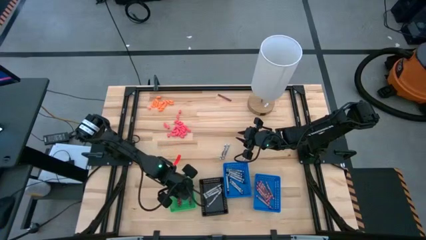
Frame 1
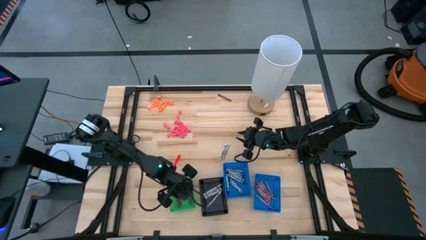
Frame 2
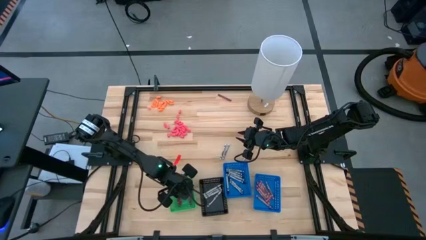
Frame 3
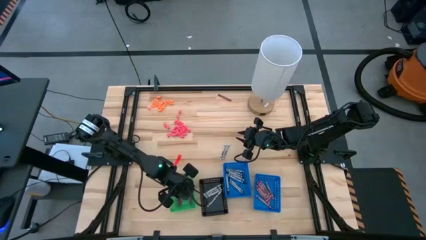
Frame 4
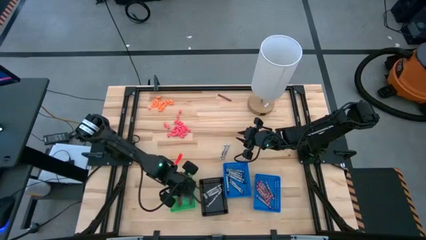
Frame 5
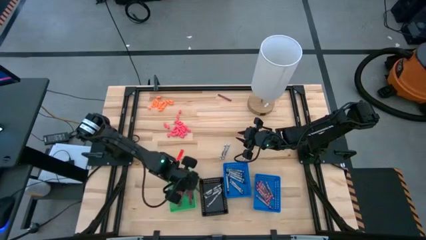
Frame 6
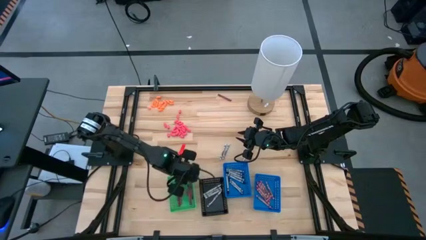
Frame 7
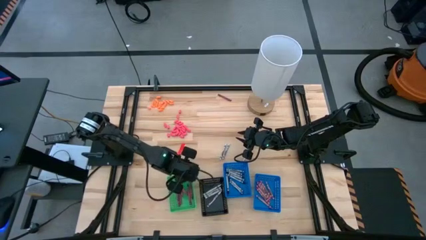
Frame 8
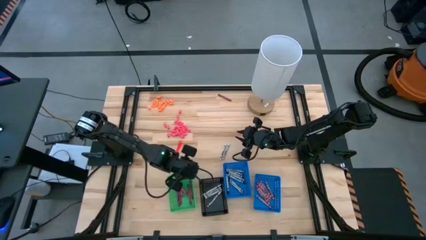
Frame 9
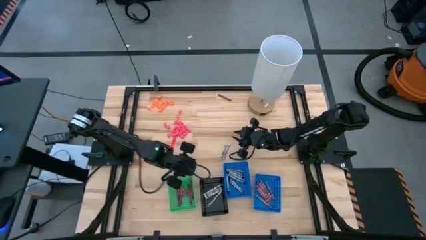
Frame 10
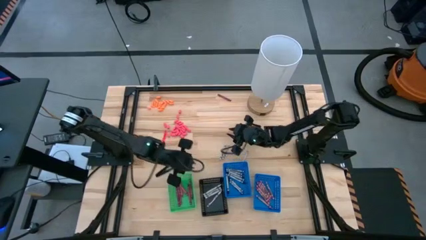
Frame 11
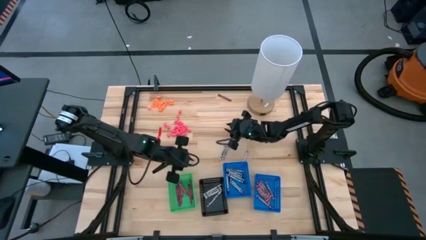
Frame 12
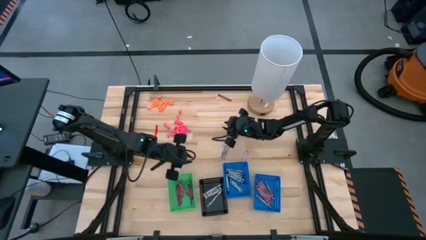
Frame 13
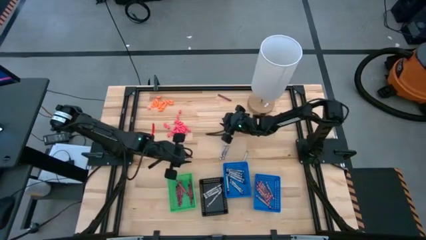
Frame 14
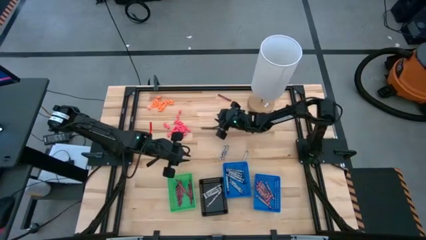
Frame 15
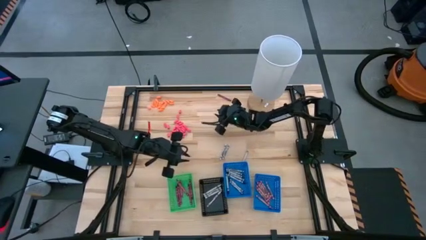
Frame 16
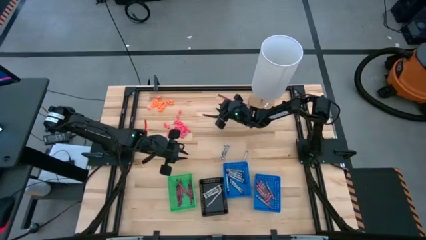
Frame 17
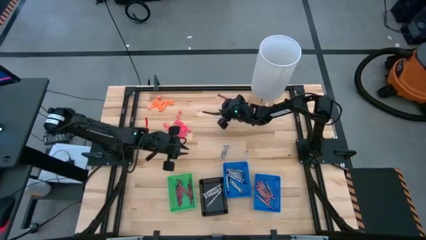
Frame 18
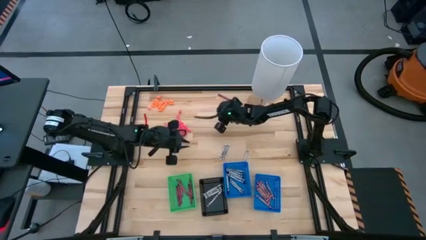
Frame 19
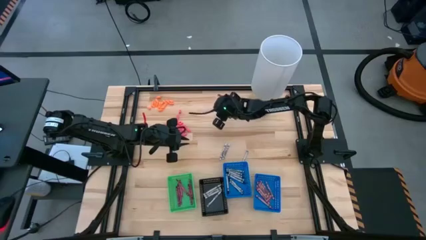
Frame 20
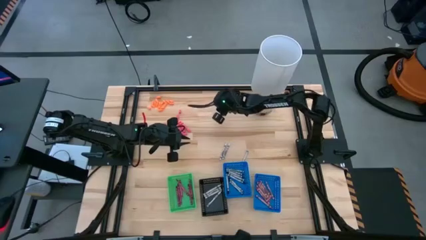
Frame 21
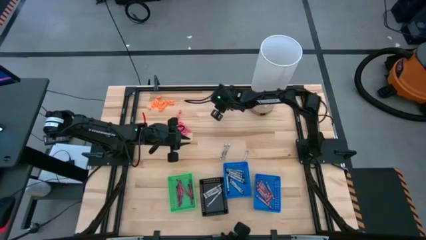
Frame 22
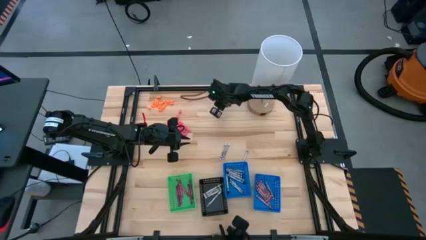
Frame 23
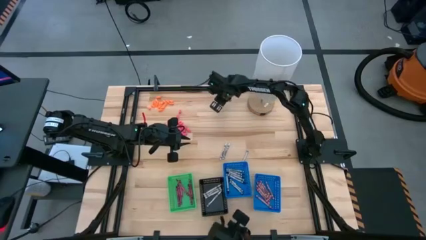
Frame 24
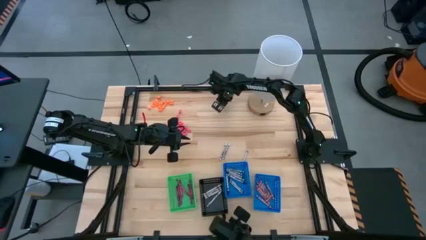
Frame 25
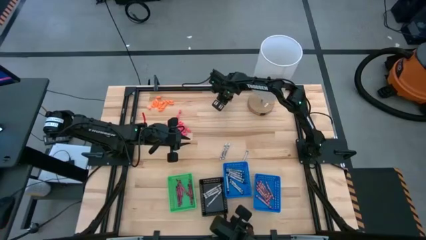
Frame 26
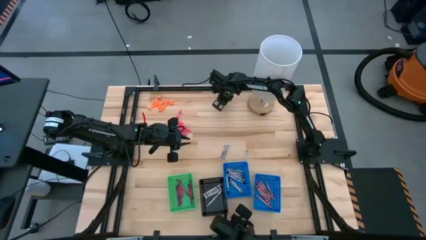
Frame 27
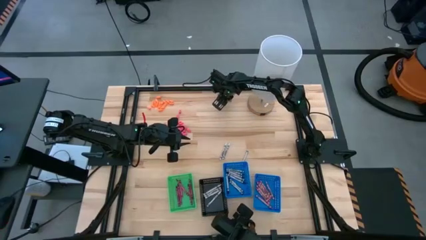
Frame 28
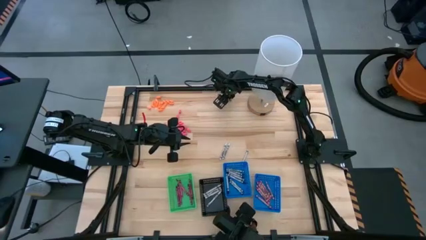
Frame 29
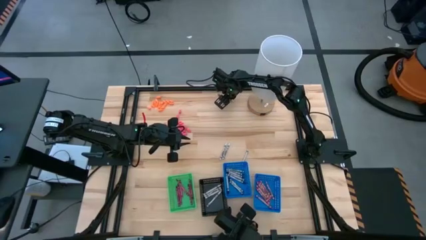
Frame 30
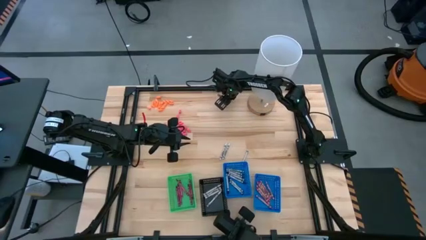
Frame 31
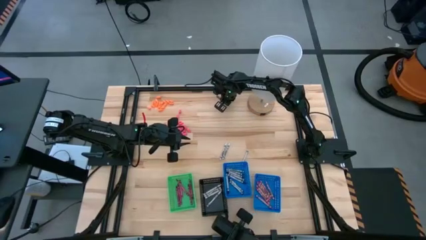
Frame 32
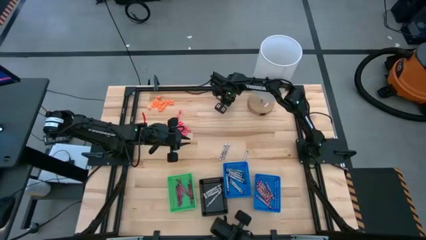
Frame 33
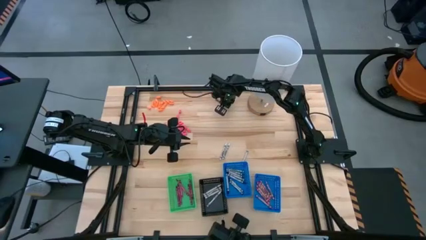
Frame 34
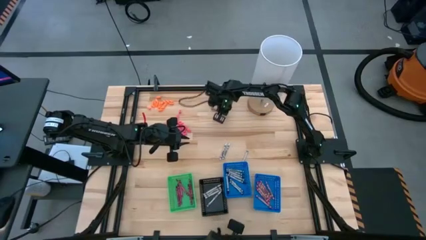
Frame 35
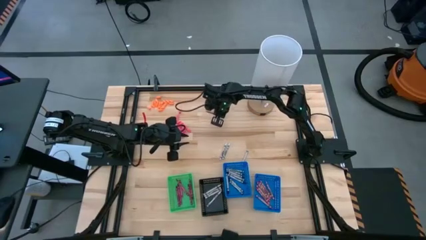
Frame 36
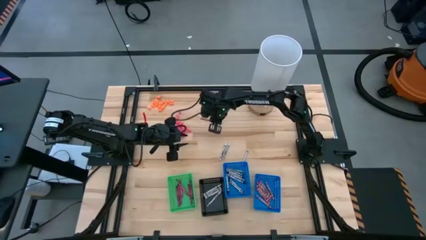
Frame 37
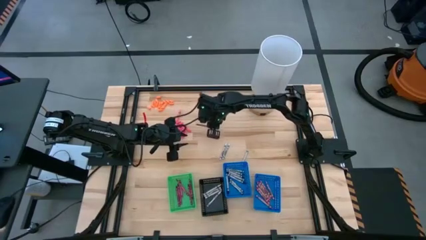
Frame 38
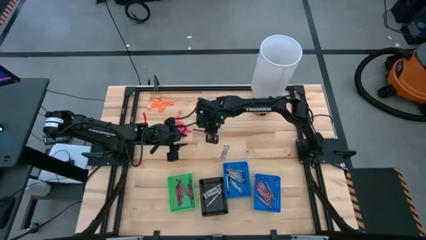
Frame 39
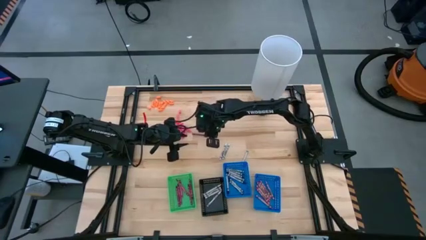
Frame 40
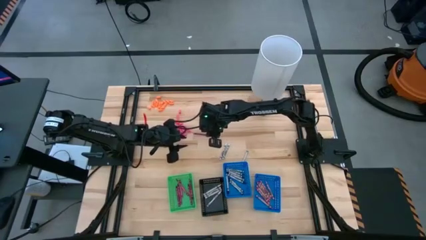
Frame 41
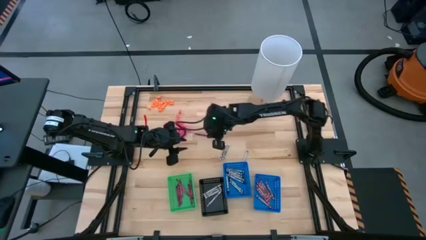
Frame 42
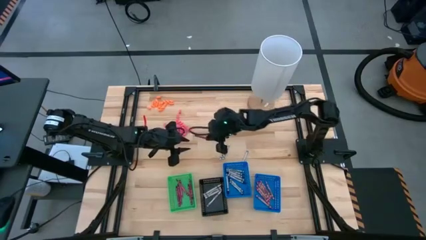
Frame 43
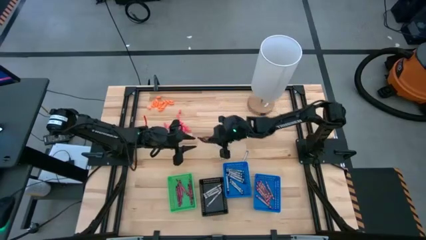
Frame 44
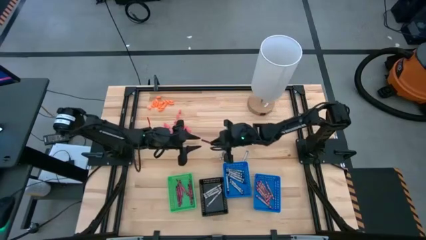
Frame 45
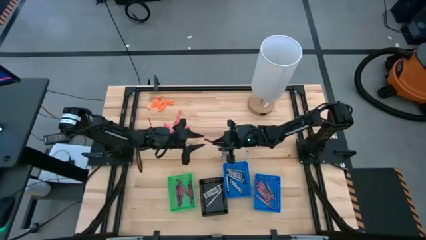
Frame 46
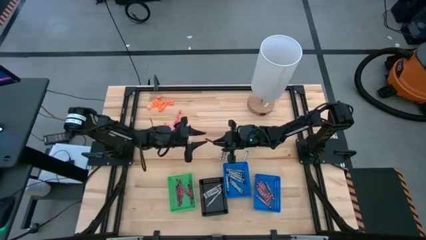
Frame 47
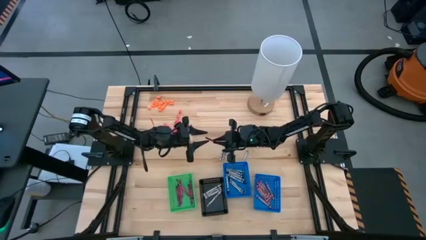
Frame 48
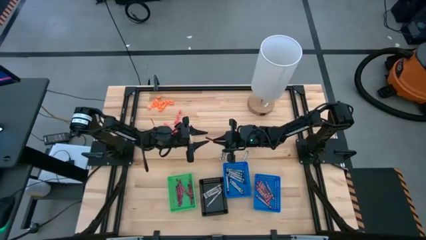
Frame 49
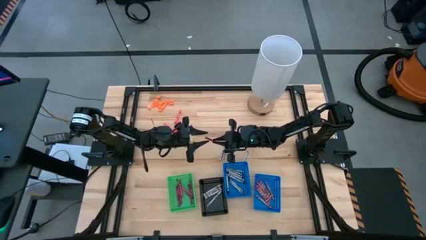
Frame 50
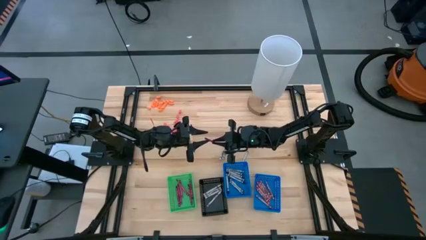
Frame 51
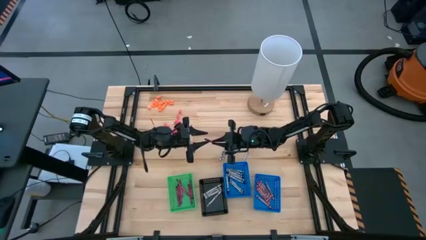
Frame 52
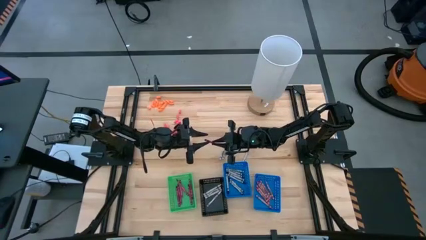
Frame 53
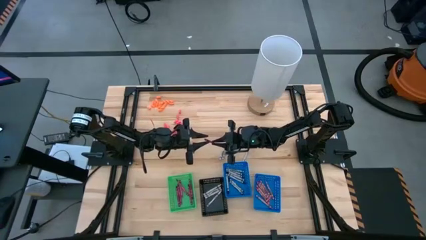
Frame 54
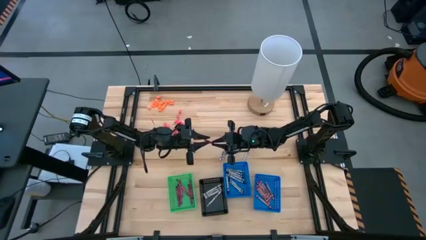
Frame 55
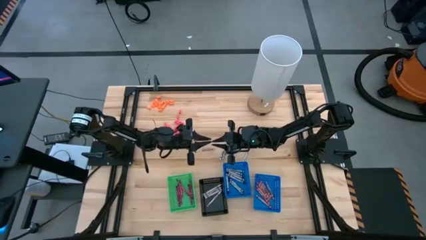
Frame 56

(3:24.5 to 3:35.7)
Task: Sort crayons
Put the red crayon into the green bin

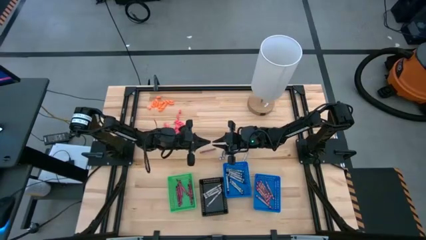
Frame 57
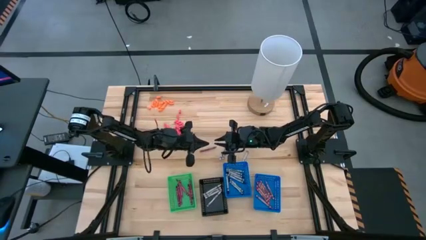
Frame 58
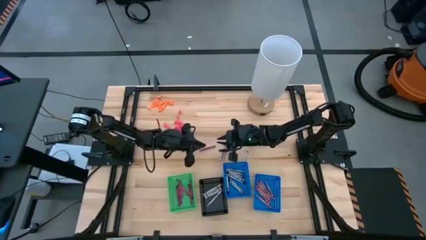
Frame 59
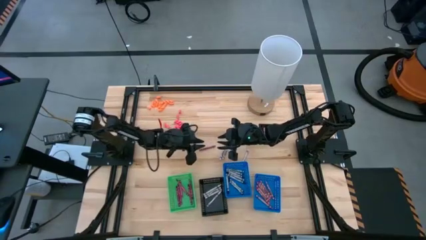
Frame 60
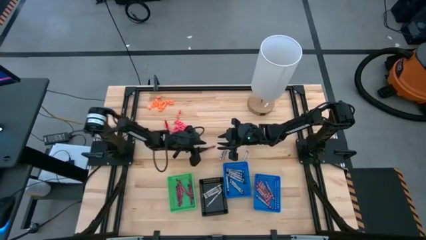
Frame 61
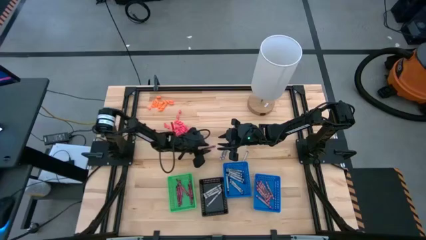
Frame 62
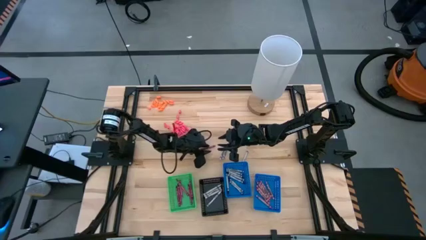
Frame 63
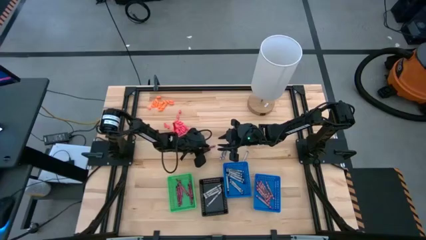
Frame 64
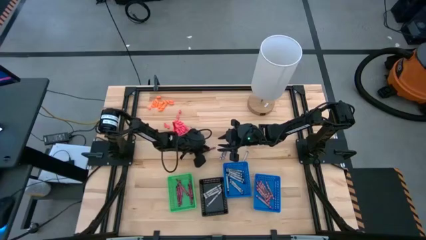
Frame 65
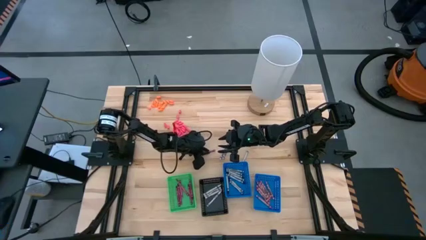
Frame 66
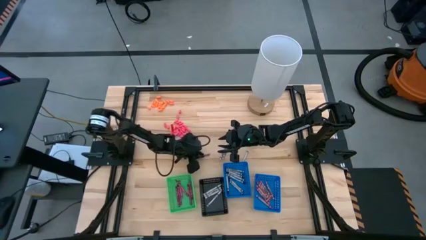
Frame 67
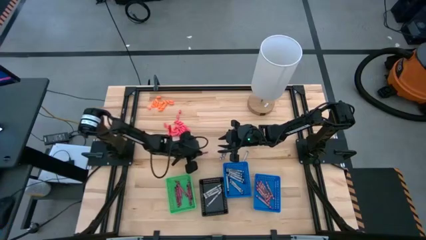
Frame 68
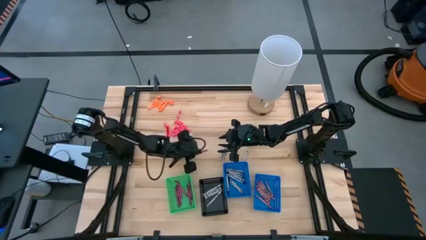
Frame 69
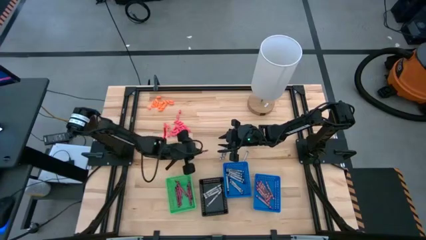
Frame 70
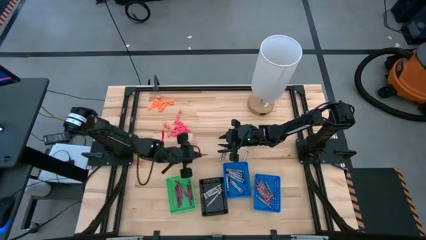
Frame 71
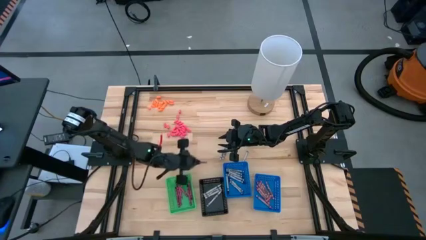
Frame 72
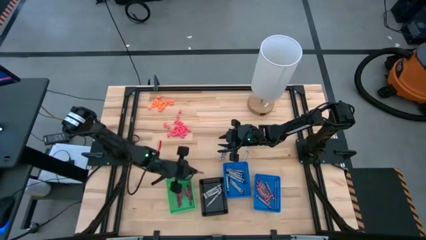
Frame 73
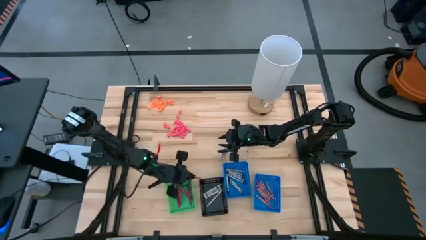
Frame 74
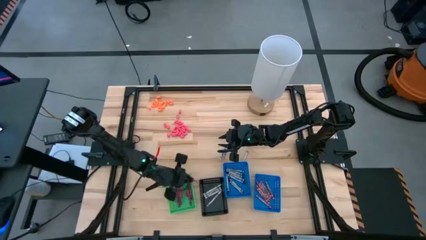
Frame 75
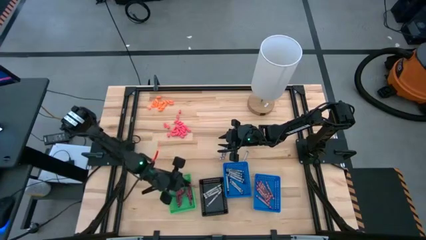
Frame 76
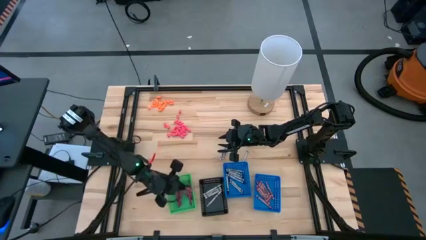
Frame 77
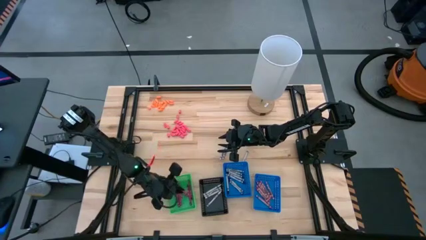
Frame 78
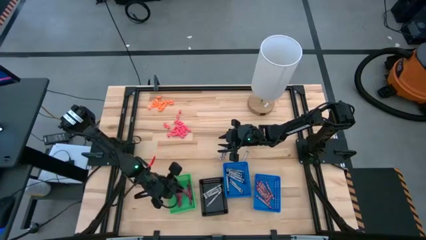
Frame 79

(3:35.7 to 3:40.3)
Put the red crayon into the green bin
